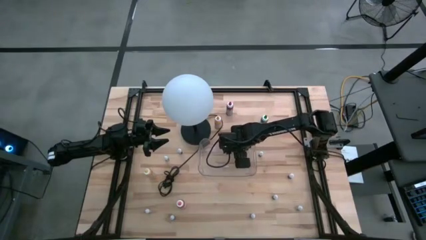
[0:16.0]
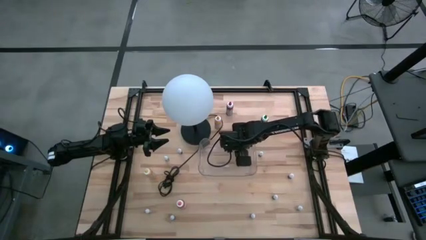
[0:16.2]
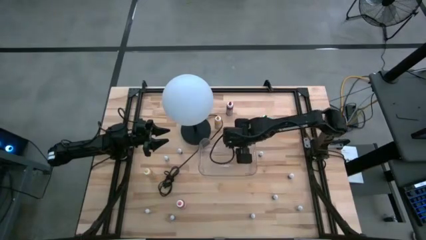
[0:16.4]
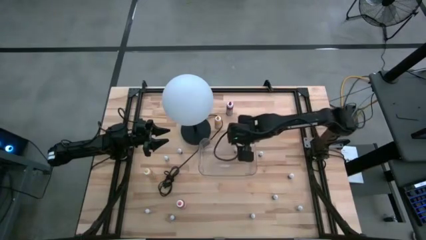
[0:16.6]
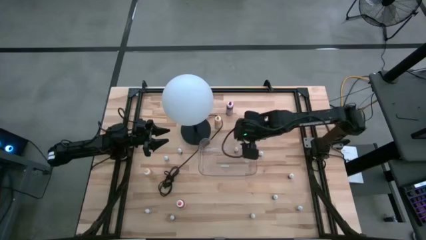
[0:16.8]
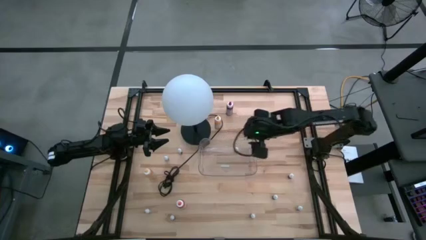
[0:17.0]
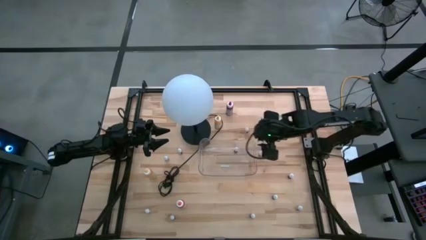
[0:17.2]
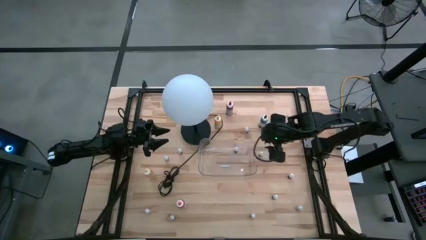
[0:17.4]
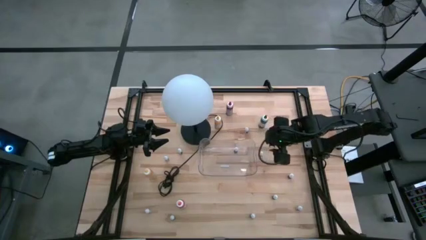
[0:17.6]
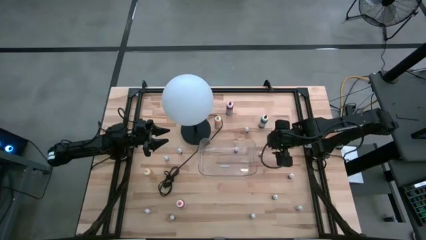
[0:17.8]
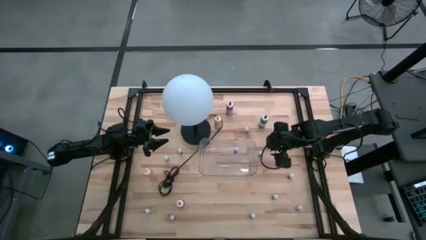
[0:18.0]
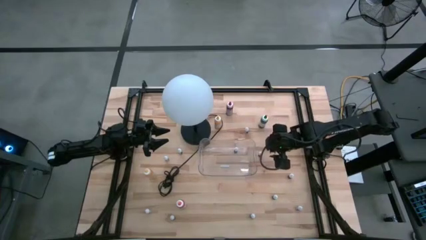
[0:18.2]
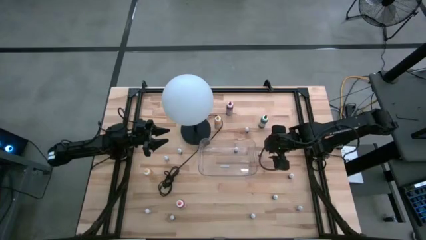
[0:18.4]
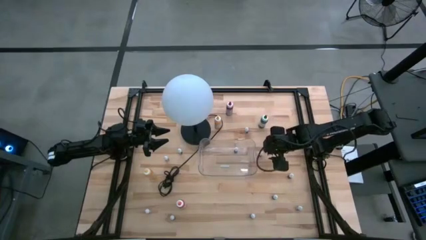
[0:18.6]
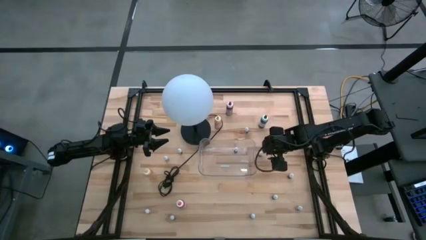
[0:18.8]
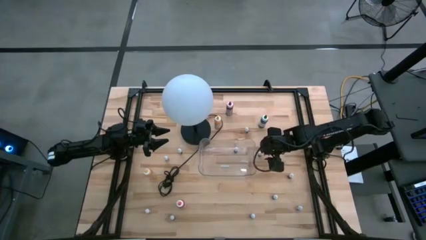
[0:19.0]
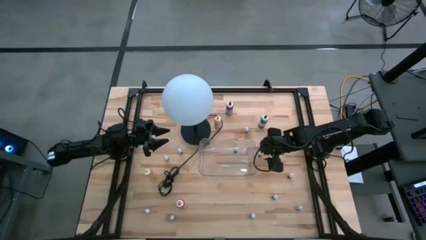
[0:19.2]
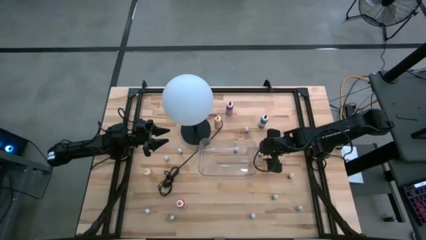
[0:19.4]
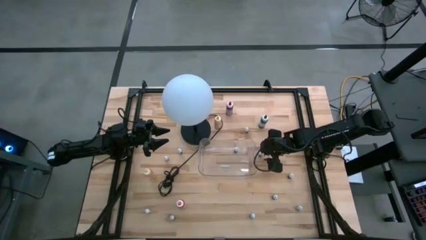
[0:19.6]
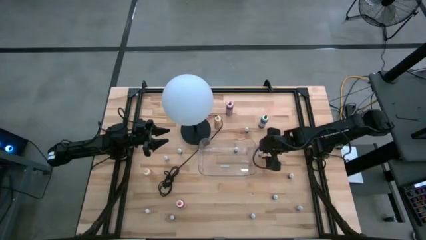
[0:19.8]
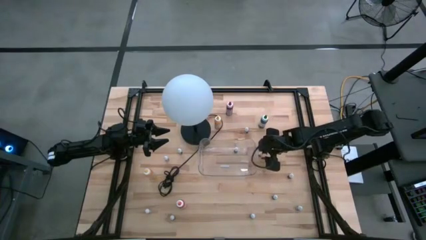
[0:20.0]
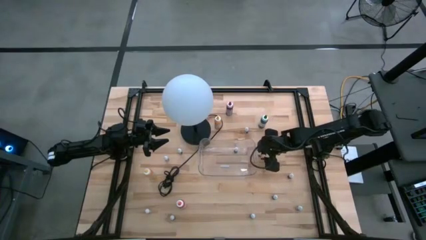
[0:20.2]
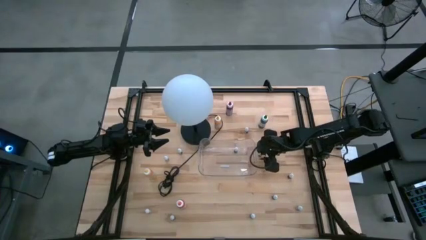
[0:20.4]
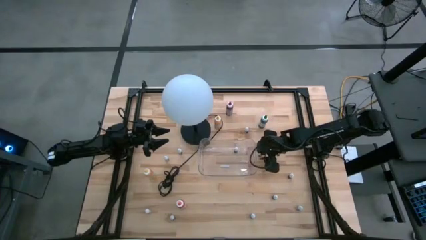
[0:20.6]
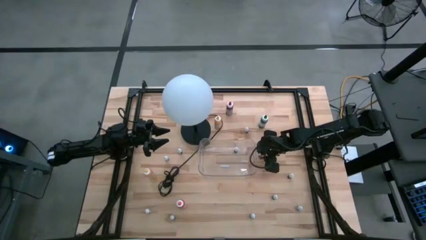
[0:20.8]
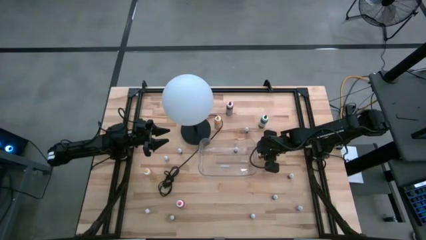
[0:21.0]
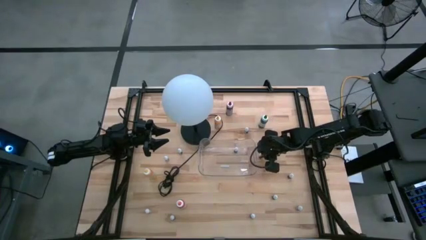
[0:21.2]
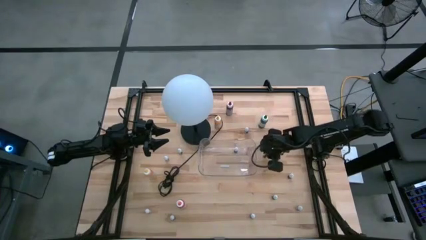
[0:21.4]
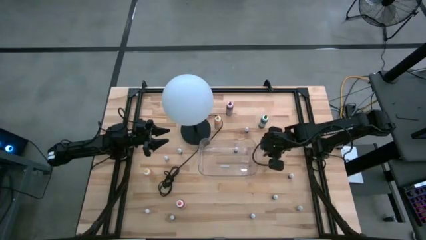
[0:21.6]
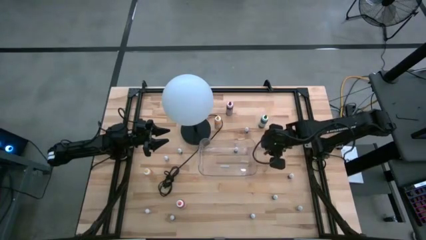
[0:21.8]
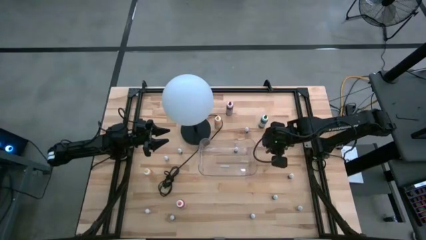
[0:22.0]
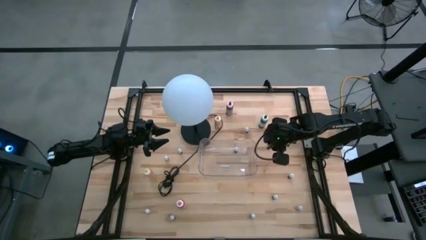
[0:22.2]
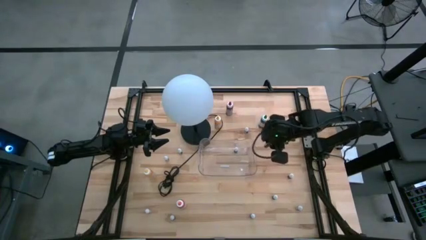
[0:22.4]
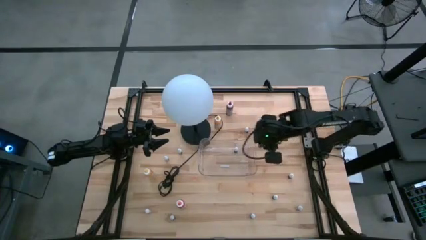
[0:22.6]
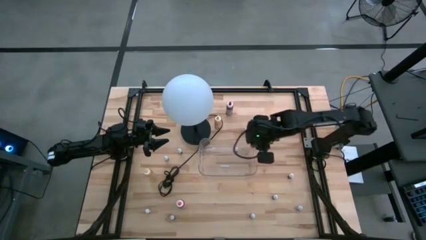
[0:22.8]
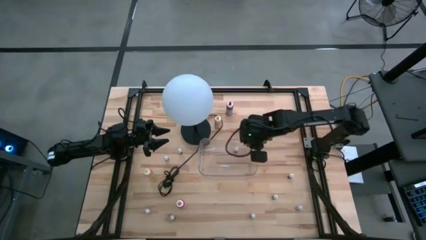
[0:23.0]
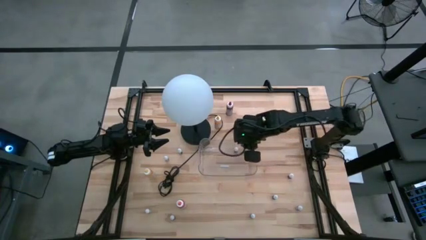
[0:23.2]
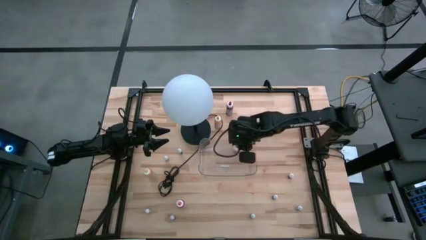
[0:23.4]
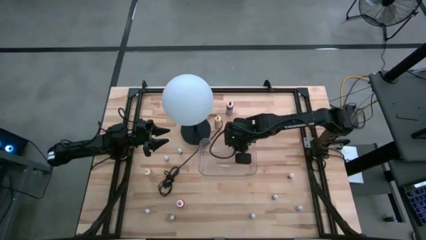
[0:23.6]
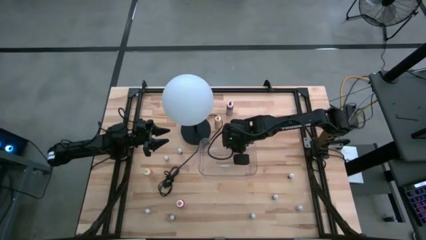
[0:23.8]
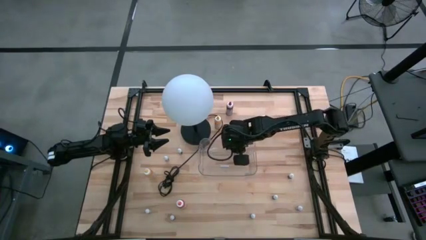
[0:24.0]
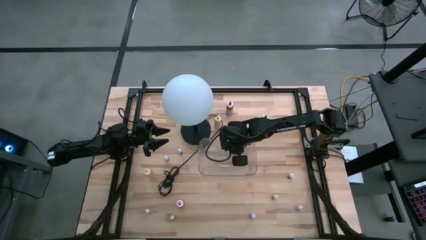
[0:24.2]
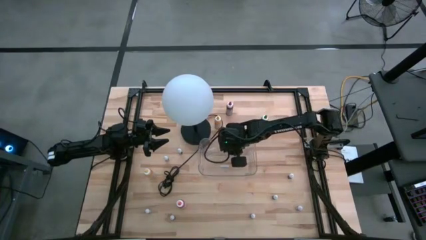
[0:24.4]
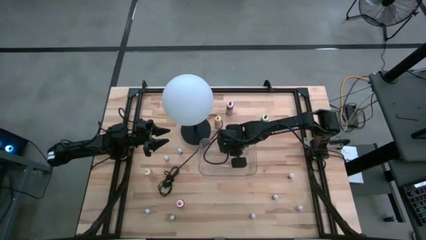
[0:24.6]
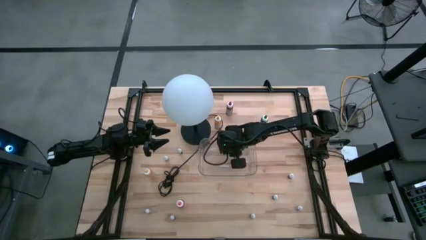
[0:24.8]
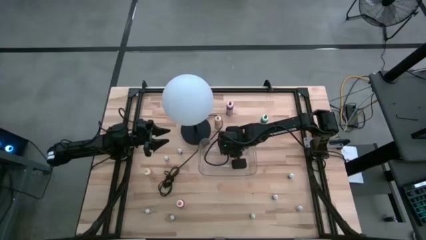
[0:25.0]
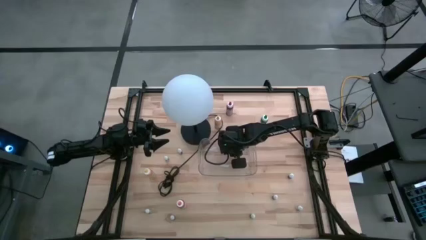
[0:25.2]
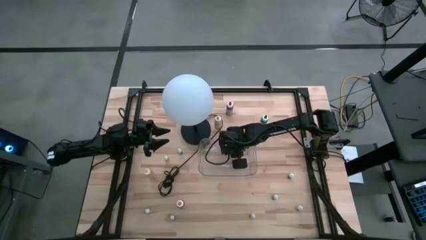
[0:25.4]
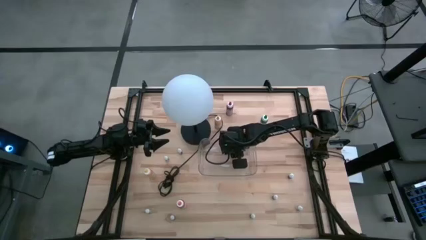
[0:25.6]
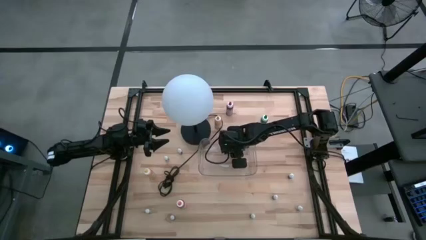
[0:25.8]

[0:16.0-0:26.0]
Task: Pick & Place food coloring
Put the small black food coloring bottle into the transparent bin
